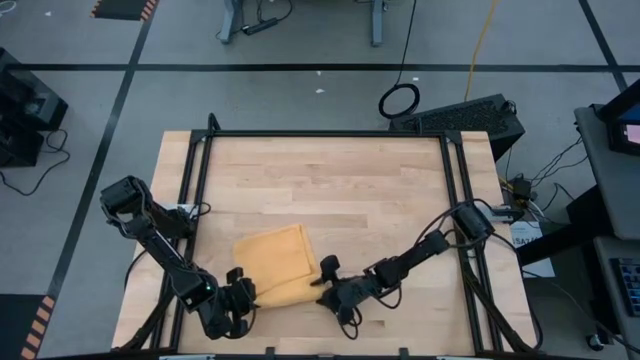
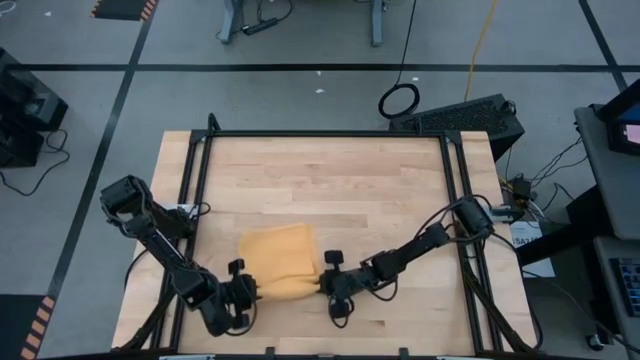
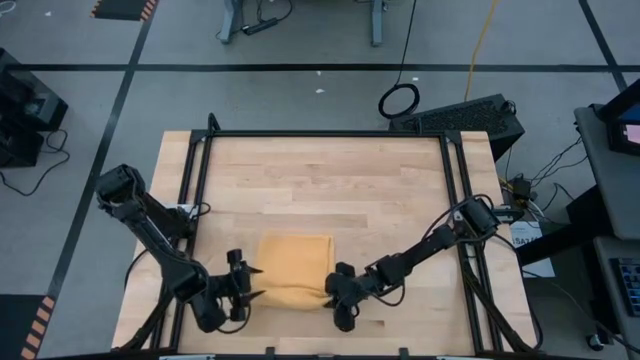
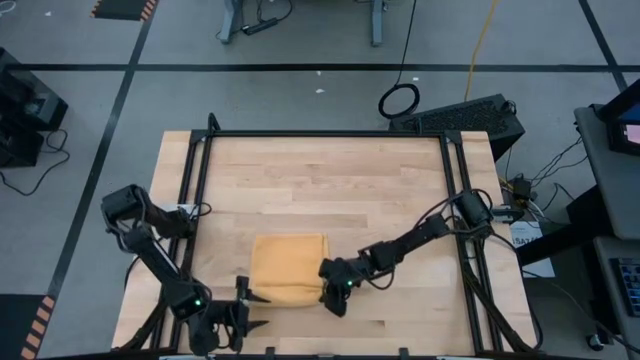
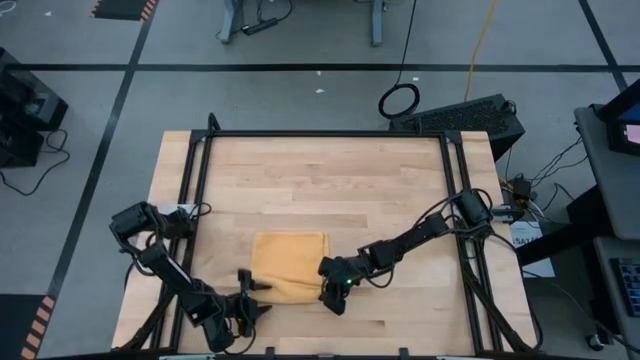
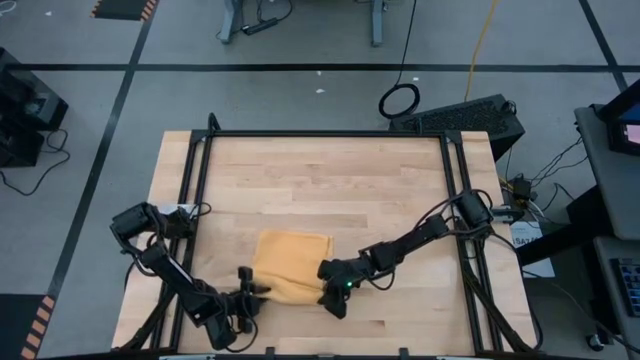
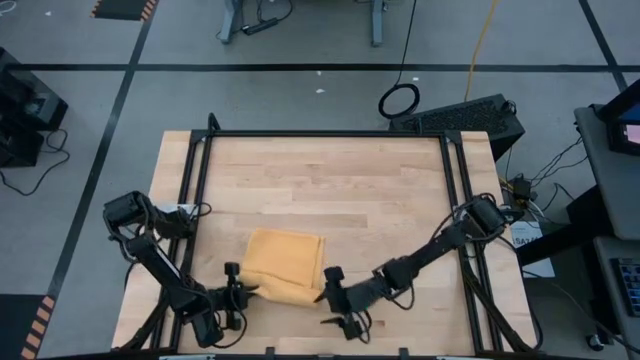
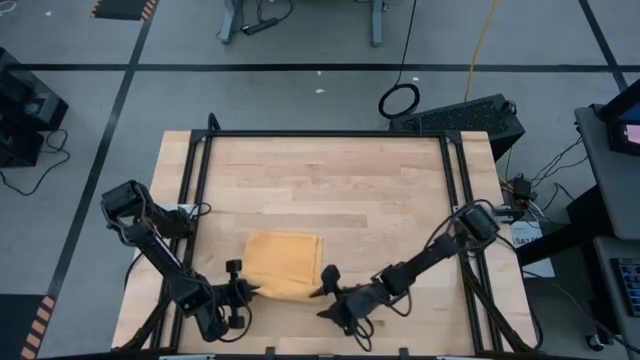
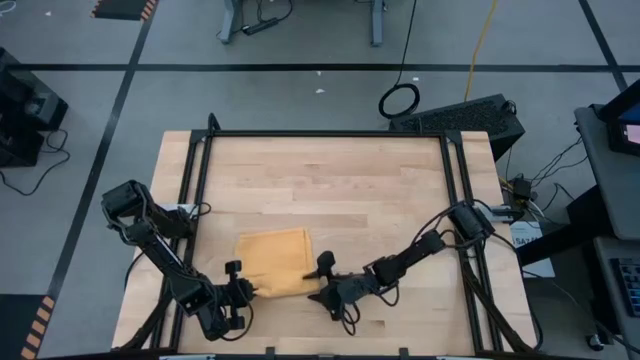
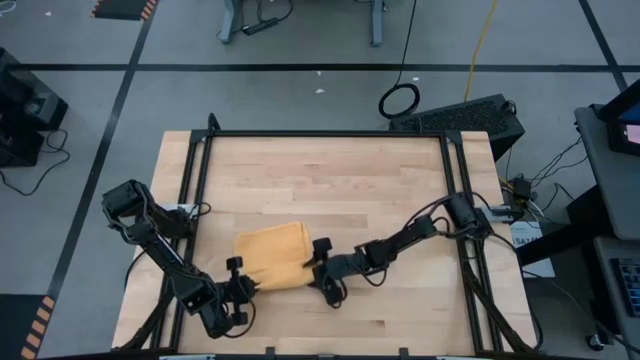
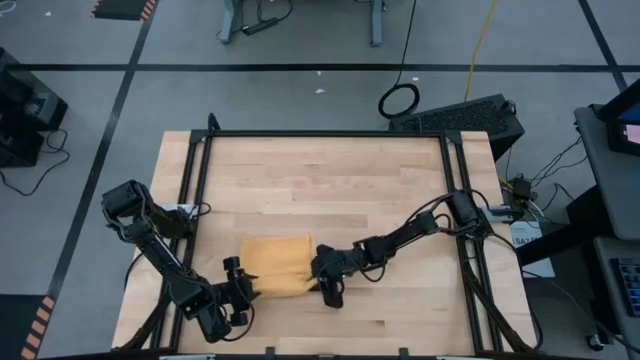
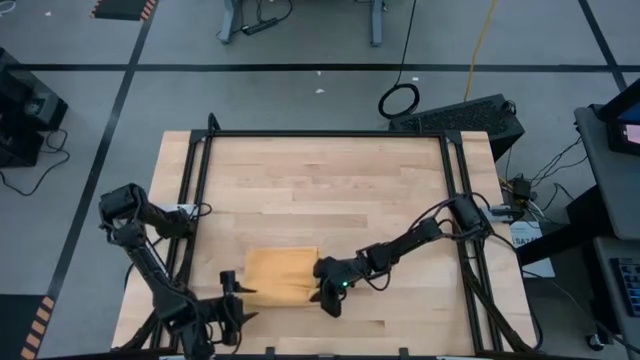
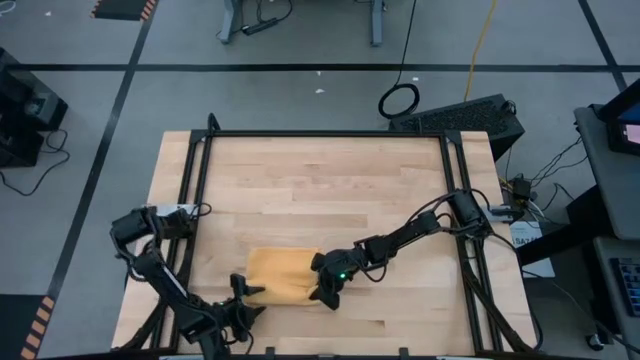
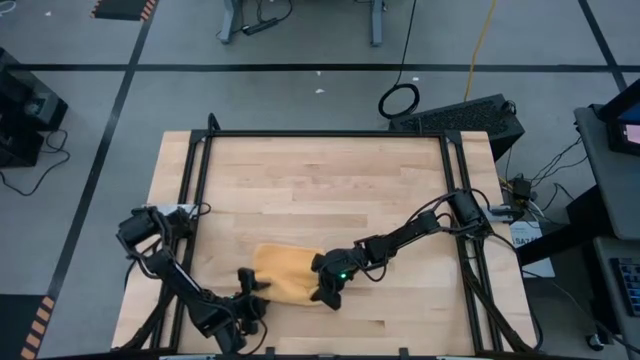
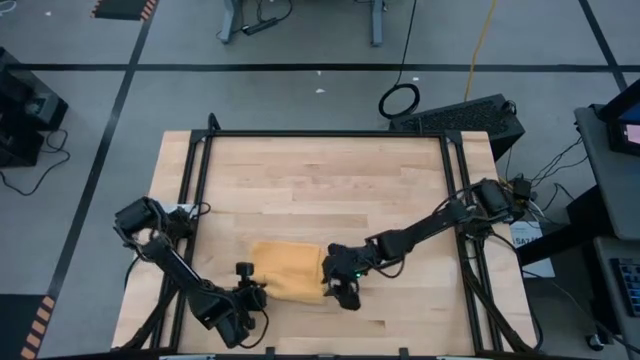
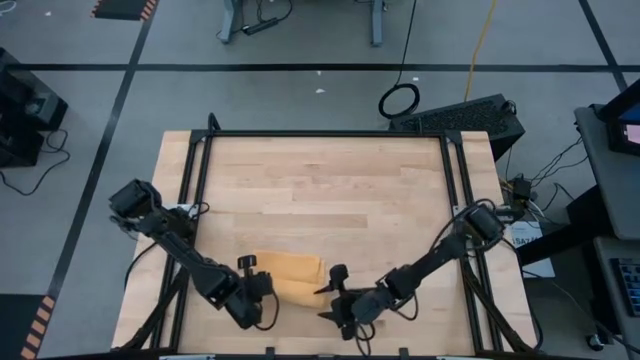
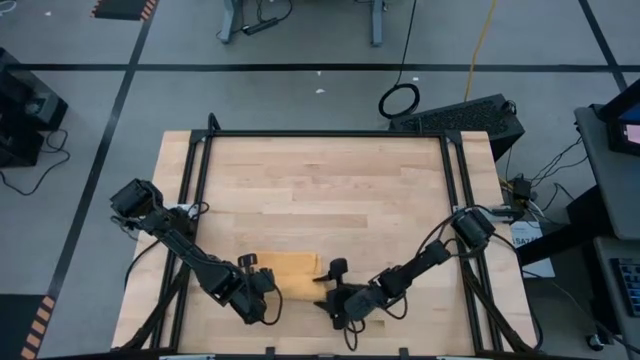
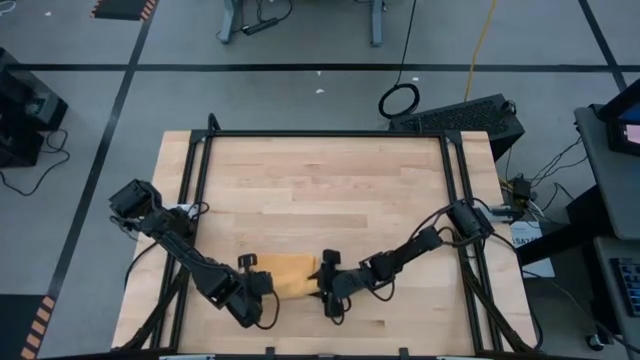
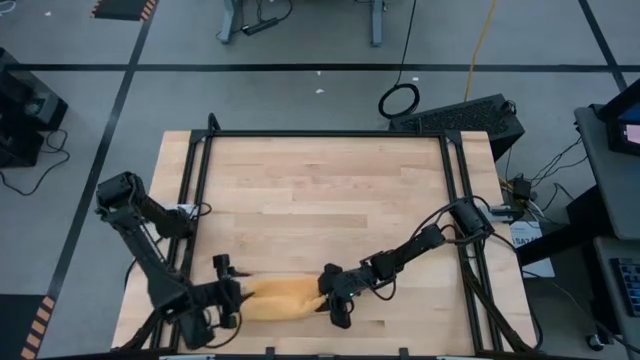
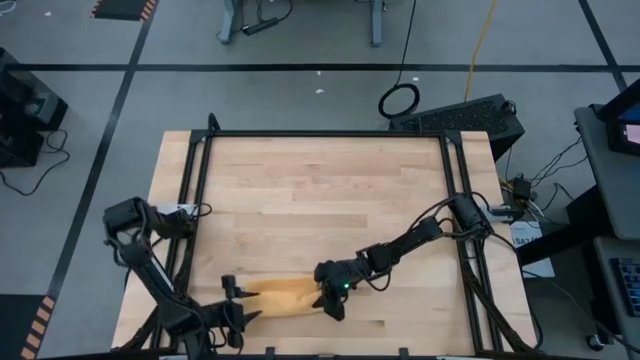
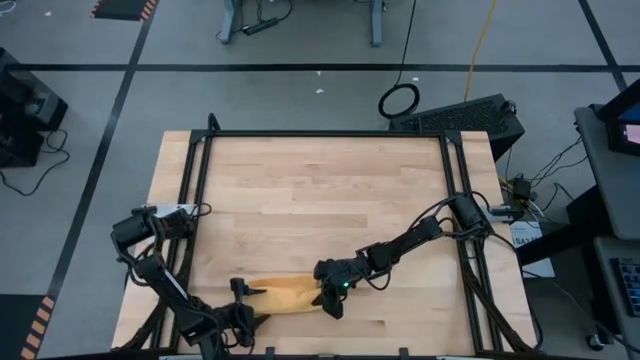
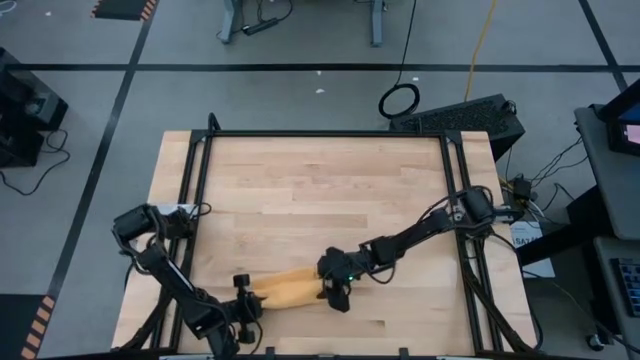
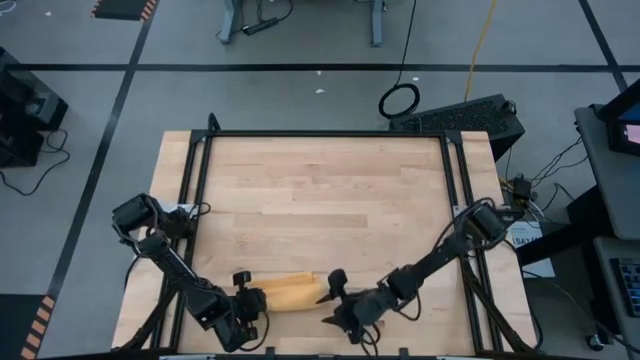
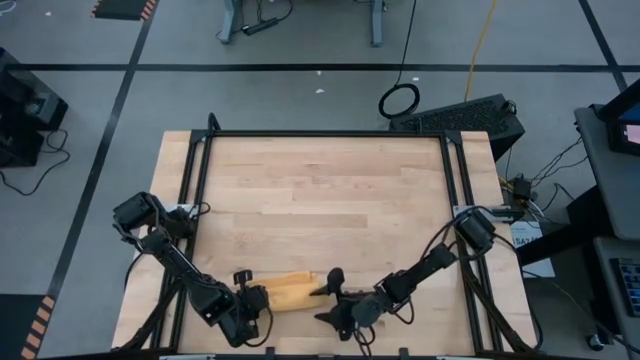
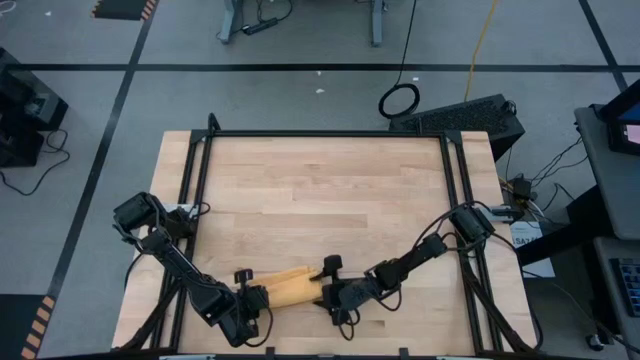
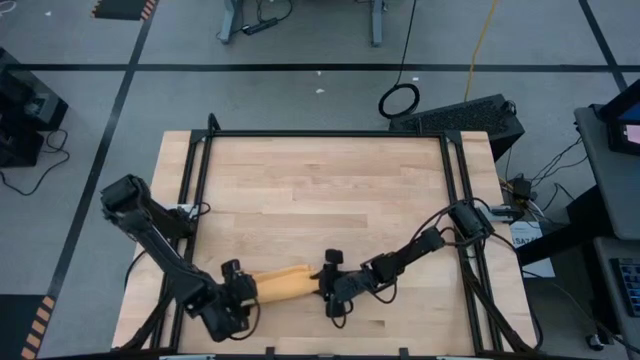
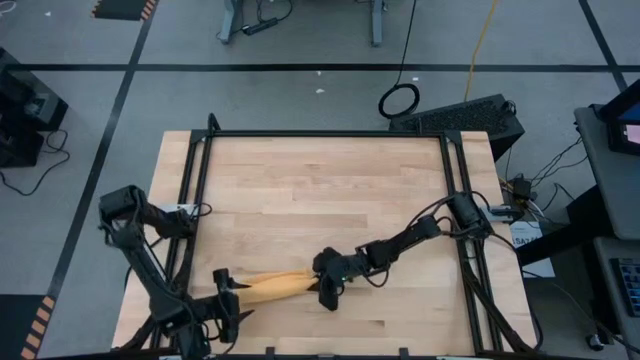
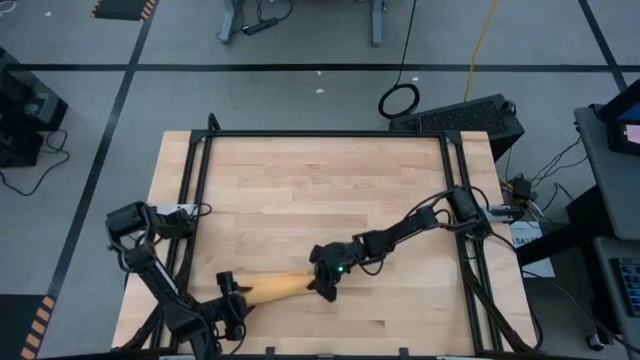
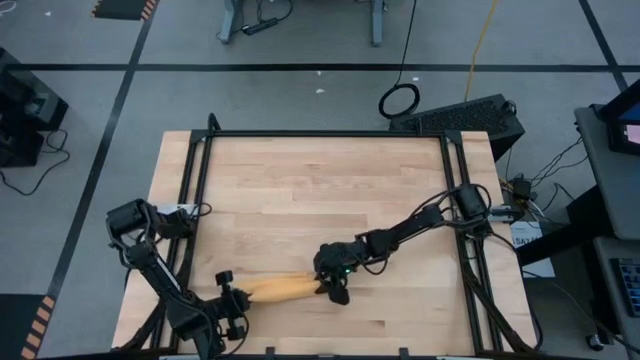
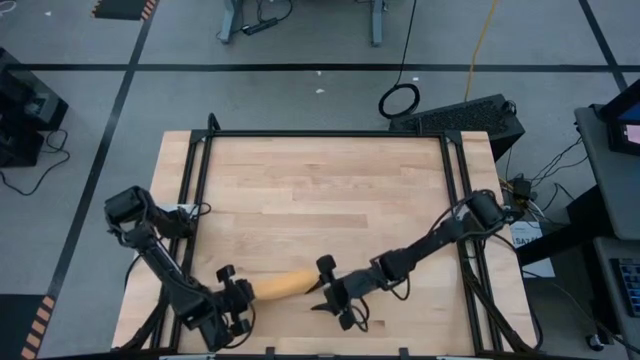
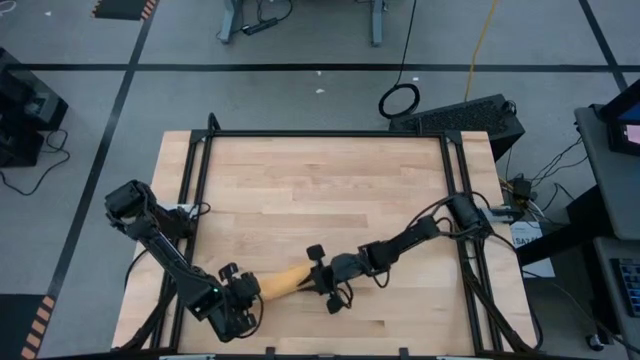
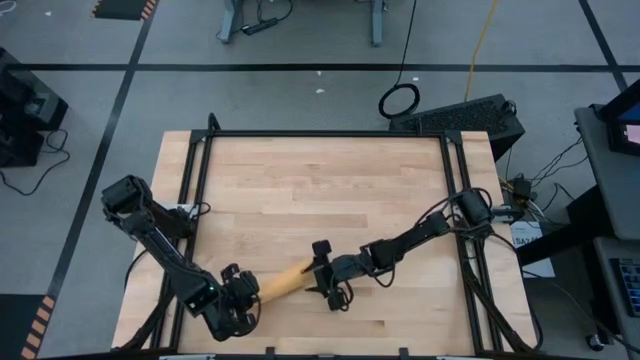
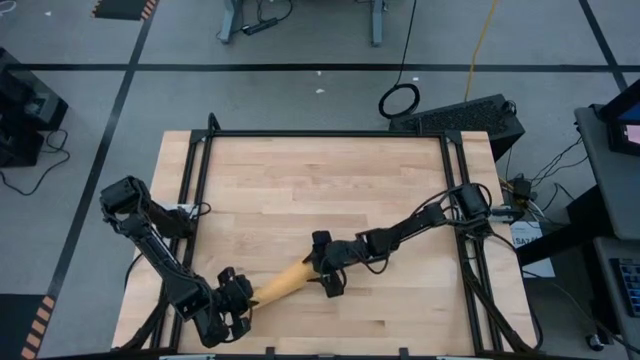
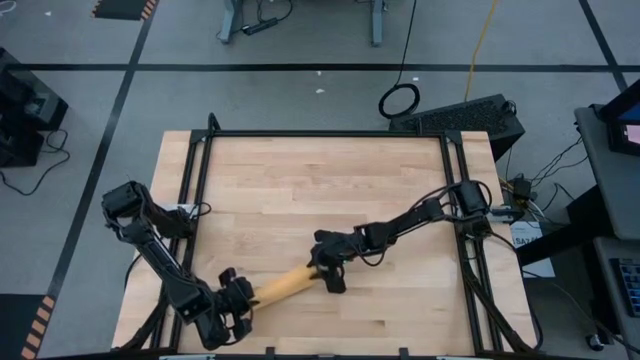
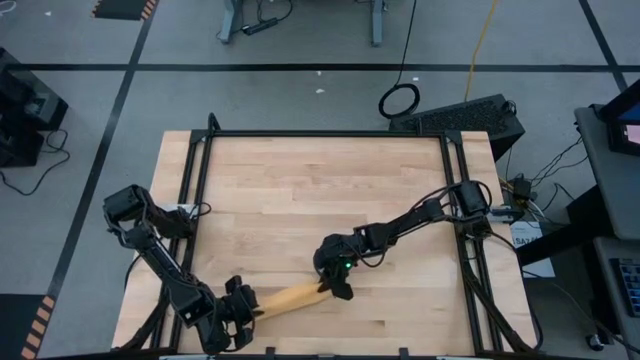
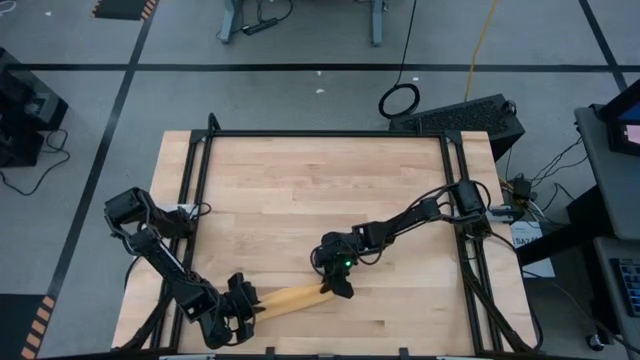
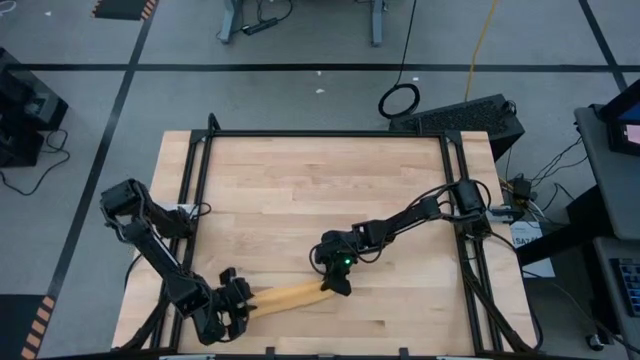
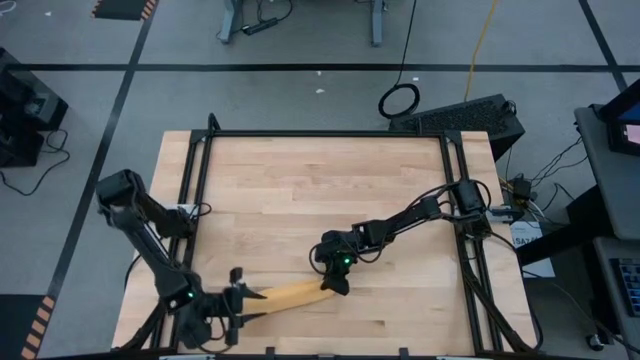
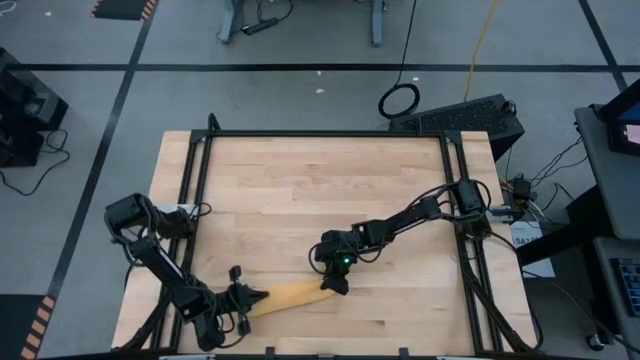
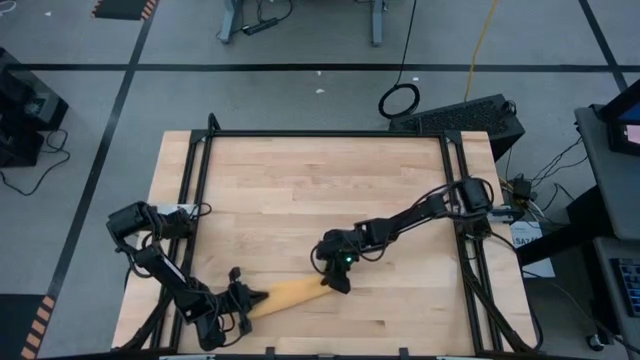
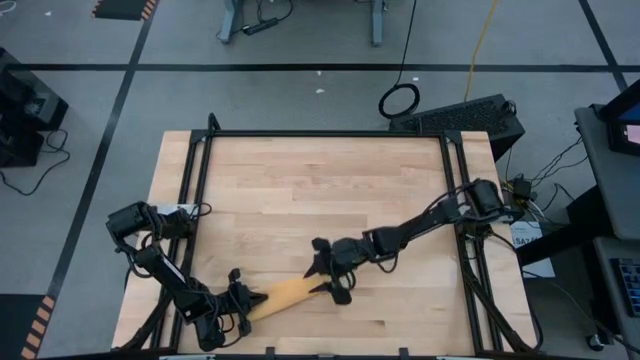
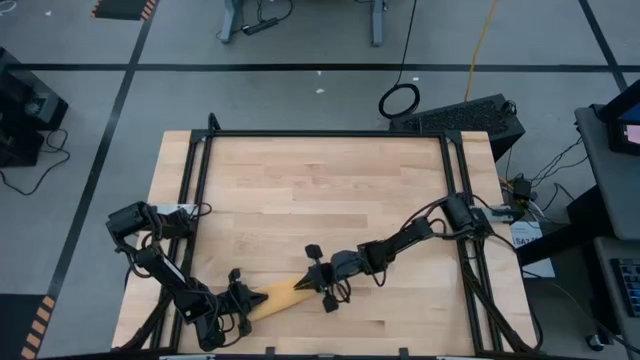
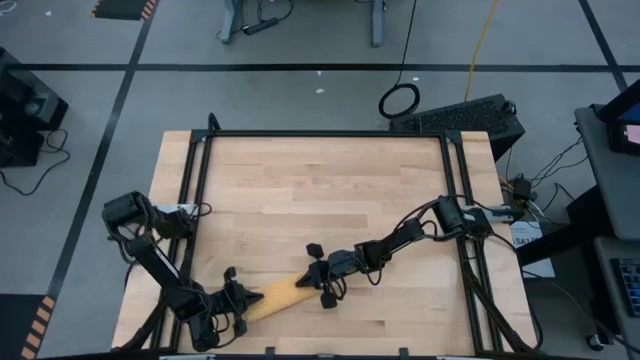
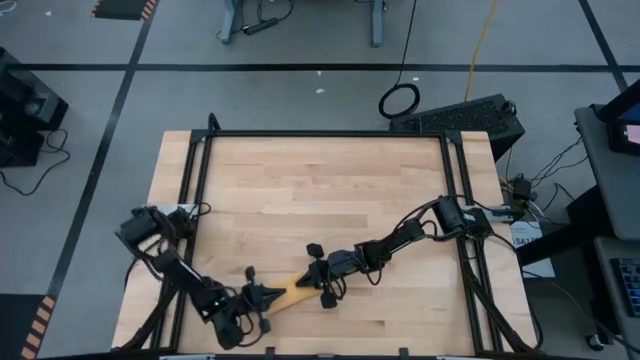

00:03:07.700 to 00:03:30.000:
Task: Roll towel
Roll the yellow towel
